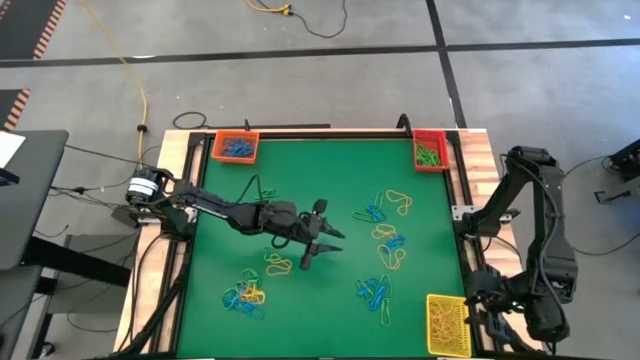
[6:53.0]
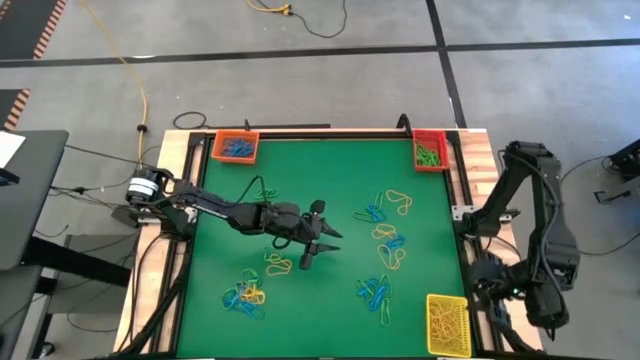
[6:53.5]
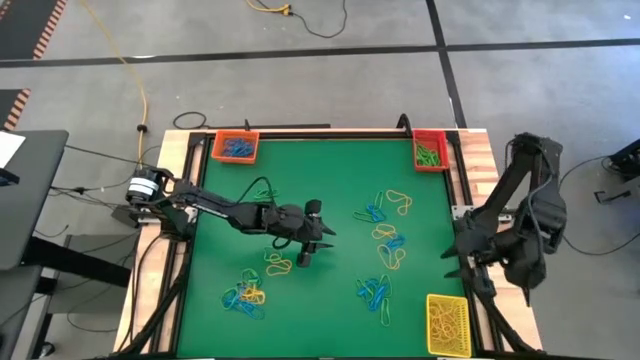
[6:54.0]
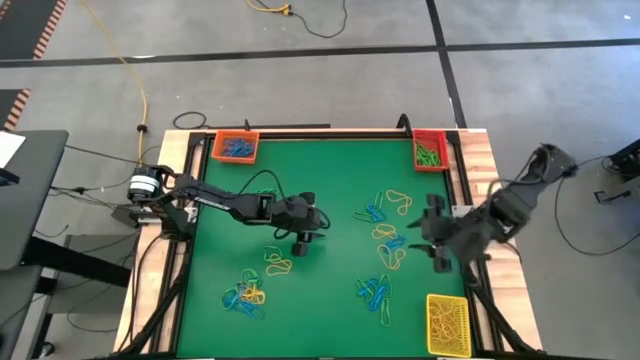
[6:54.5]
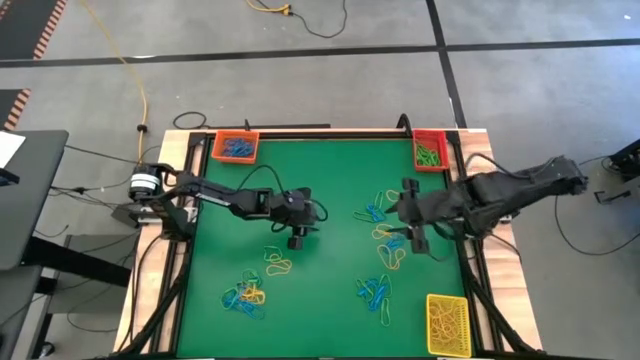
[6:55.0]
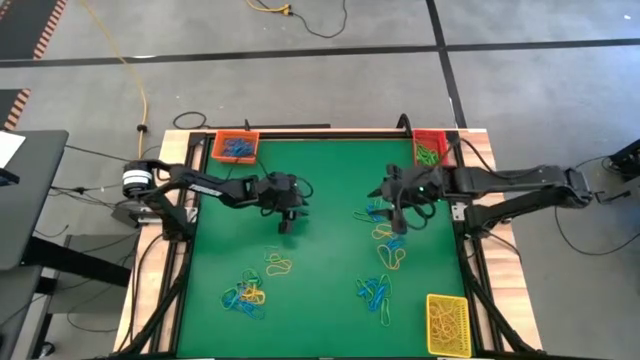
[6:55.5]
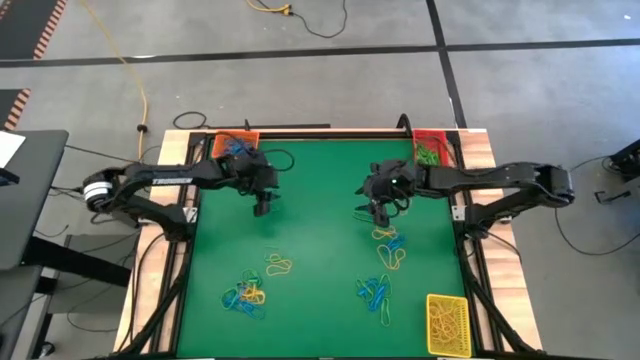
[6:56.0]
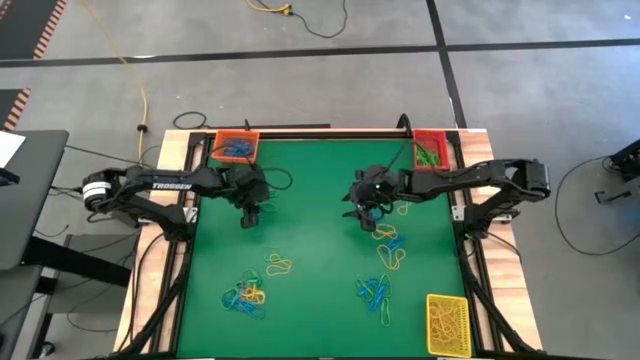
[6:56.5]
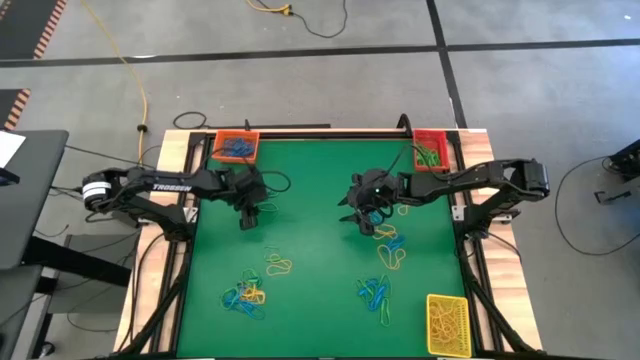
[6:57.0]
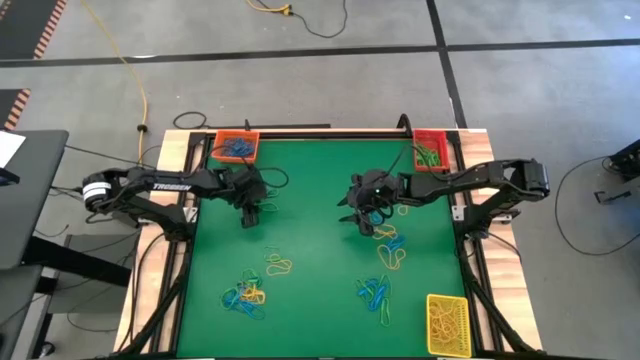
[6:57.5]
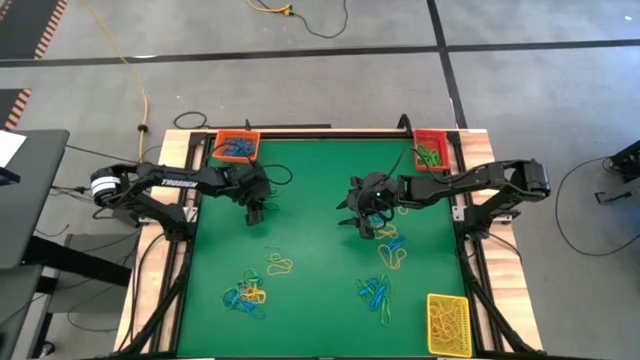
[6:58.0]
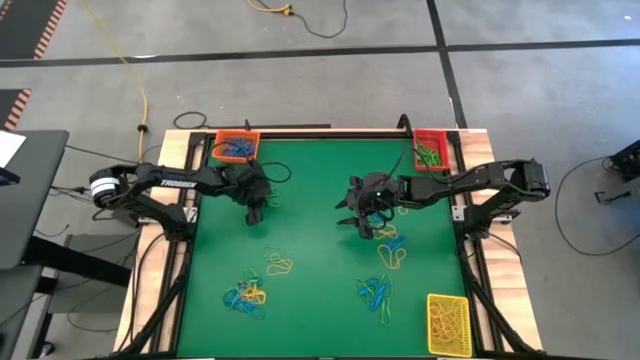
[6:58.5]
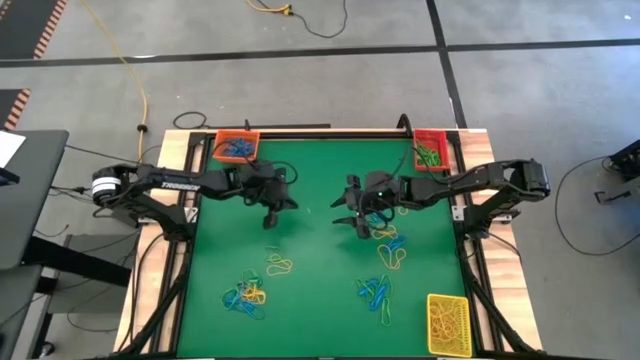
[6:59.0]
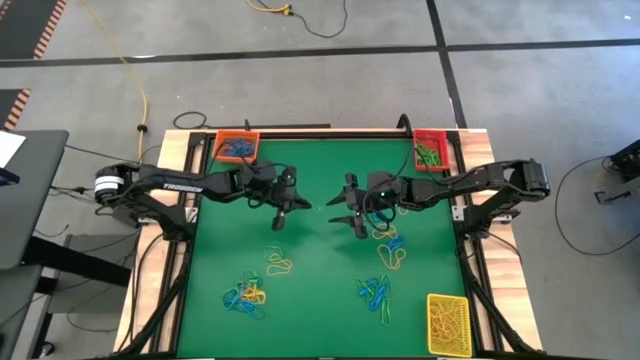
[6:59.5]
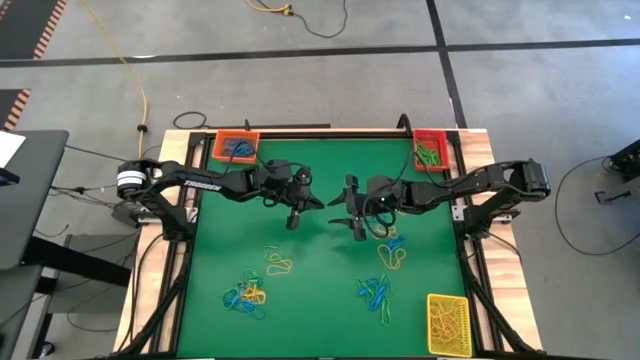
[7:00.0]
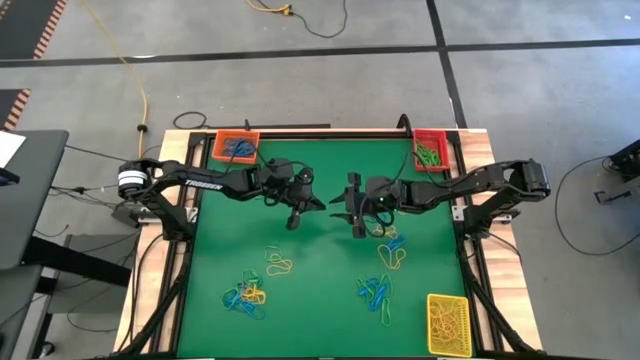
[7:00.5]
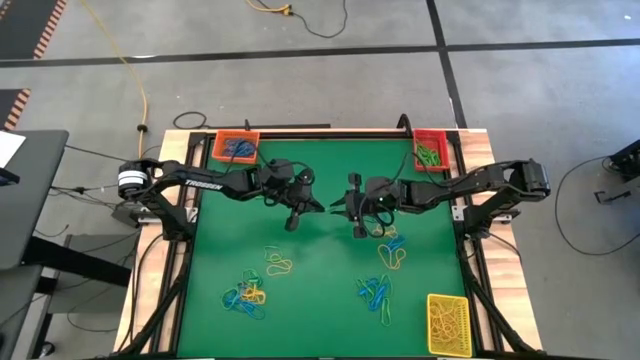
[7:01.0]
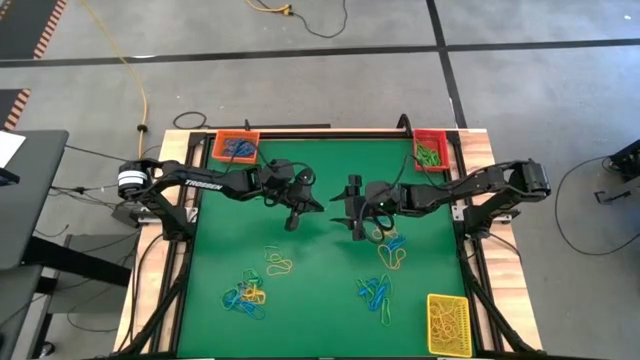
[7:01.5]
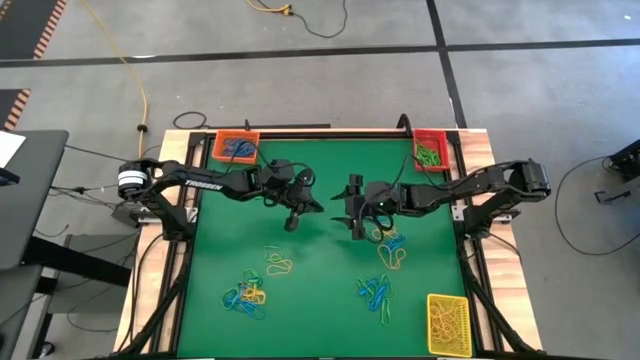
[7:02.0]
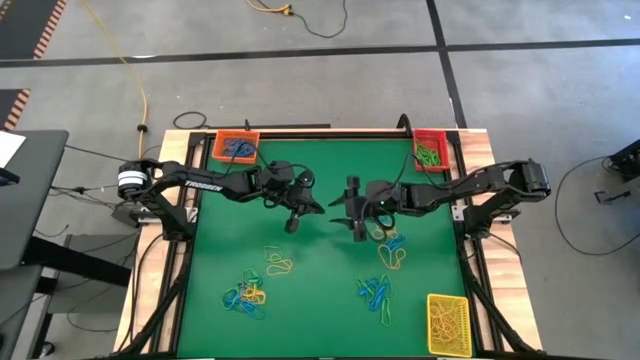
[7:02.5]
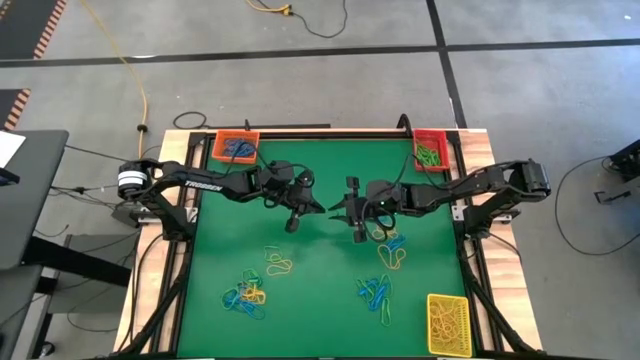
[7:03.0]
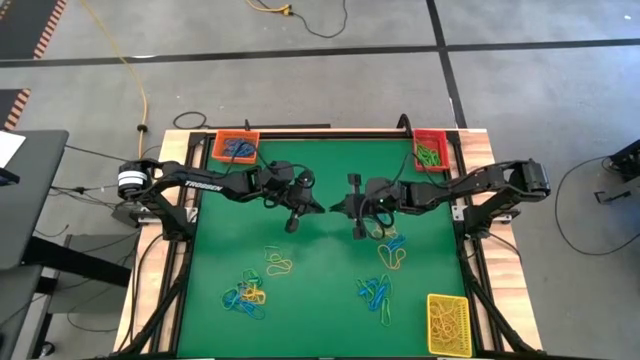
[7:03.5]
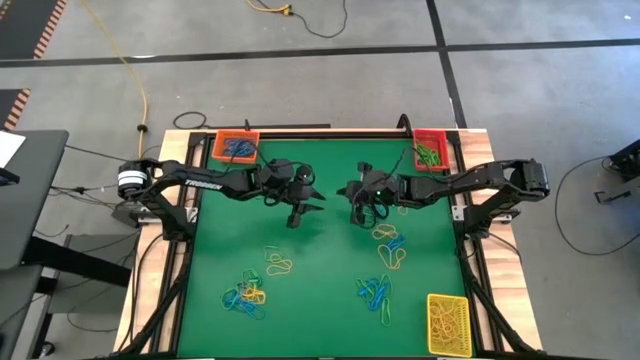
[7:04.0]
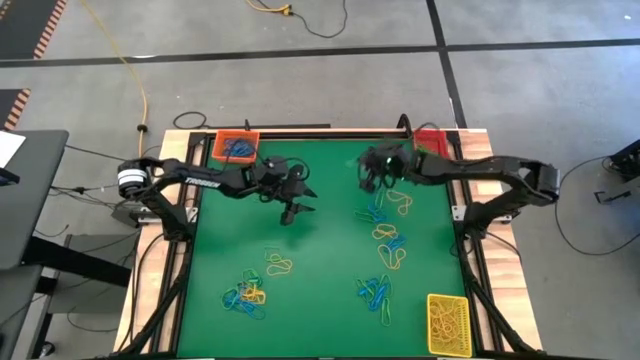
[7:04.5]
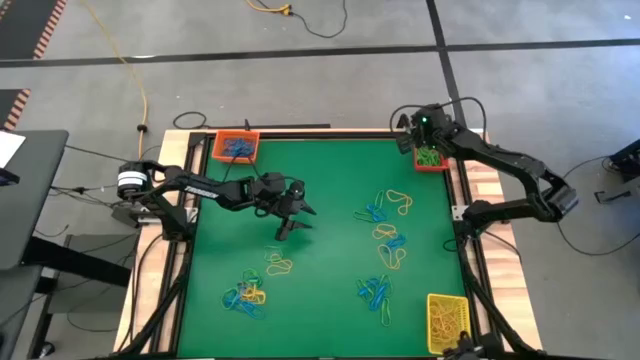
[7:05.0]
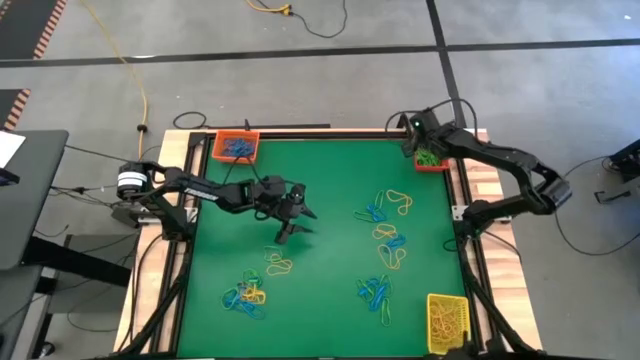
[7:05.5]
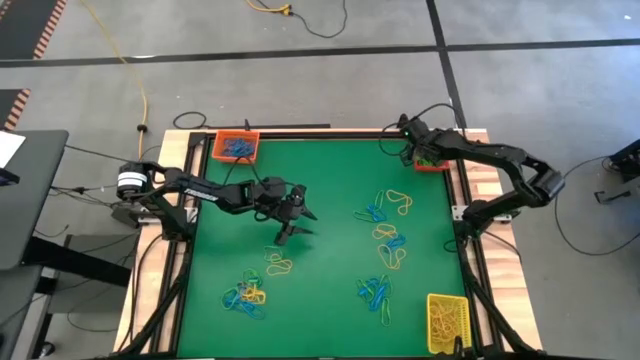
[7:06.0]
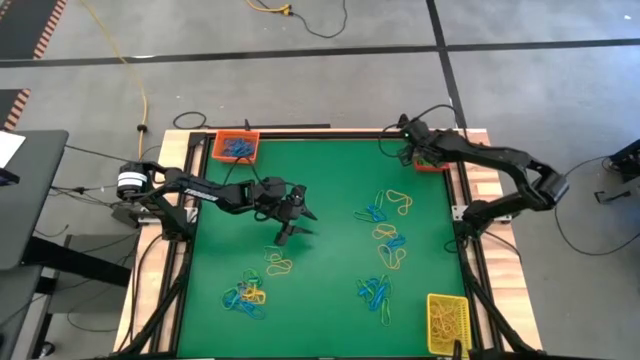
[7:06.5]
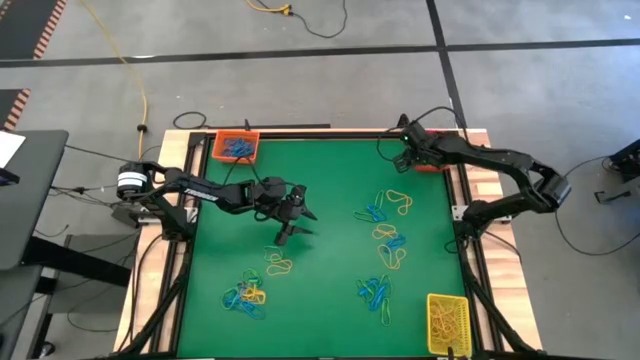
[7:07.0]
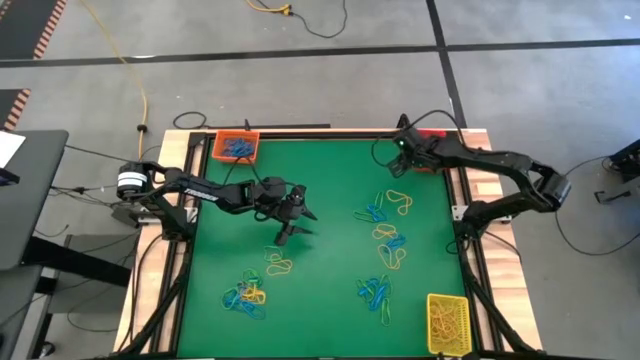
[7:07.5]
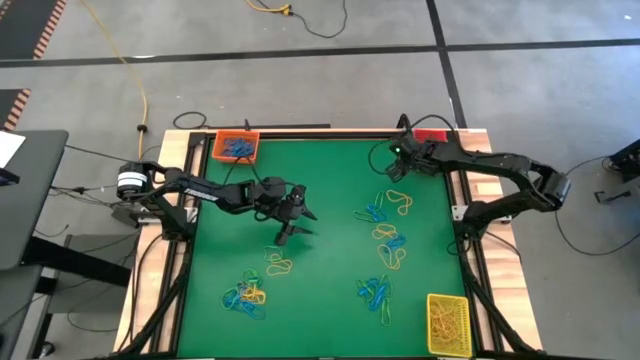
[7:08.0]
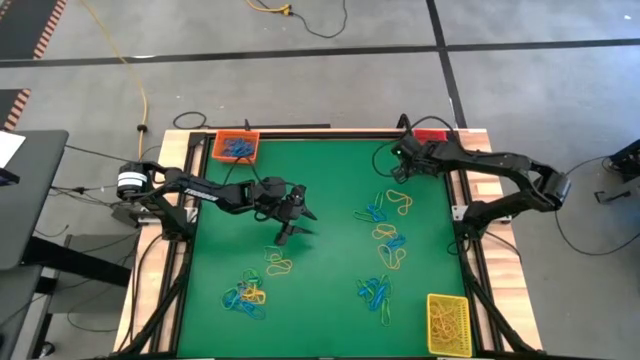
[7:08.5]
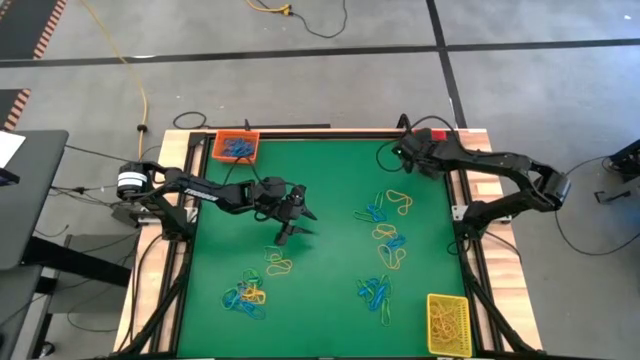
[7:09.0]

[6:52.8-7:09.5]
Task: Sort rubber bands into baskets
Put the top left green rubber band into the red bin
